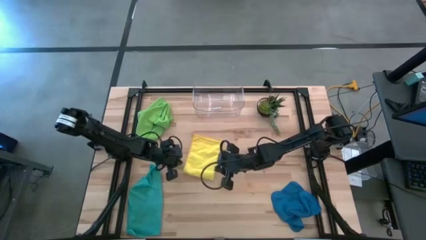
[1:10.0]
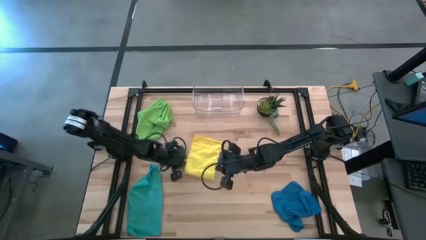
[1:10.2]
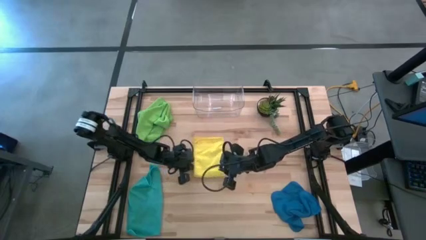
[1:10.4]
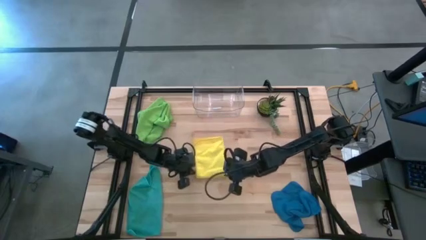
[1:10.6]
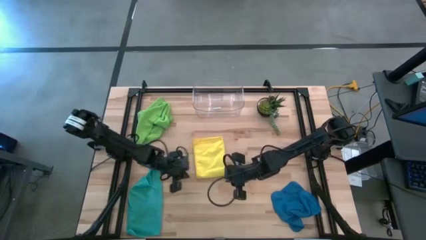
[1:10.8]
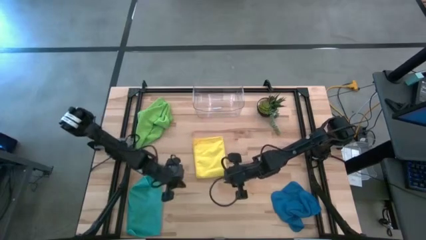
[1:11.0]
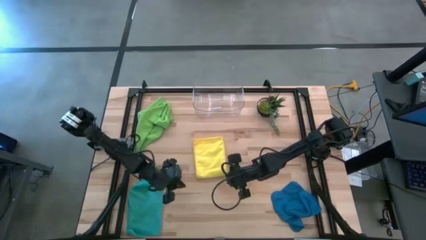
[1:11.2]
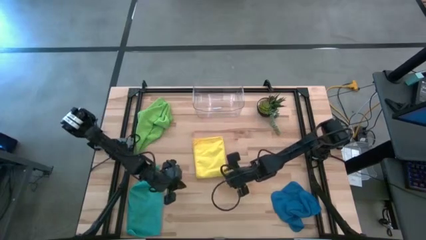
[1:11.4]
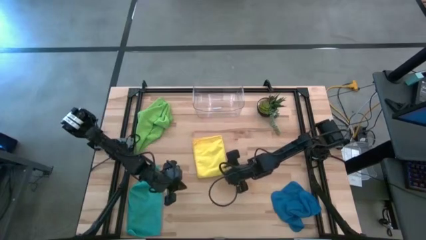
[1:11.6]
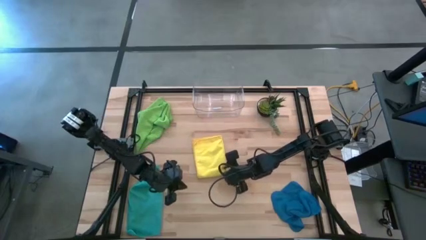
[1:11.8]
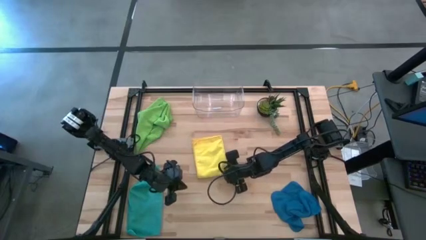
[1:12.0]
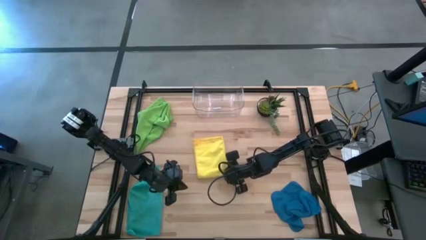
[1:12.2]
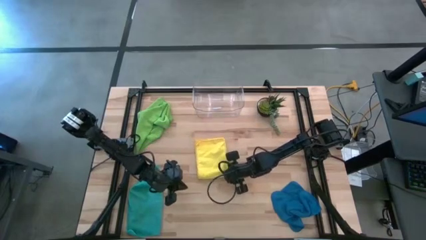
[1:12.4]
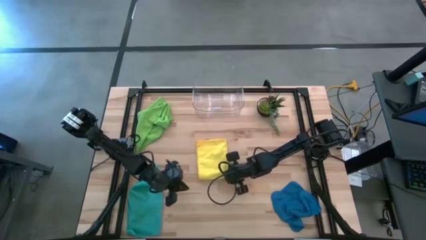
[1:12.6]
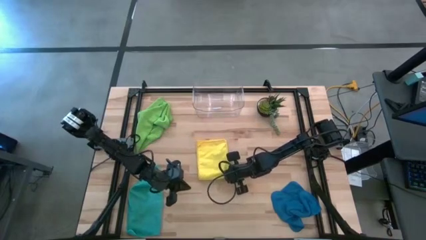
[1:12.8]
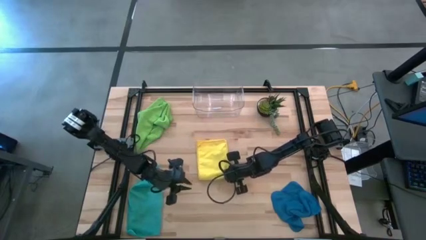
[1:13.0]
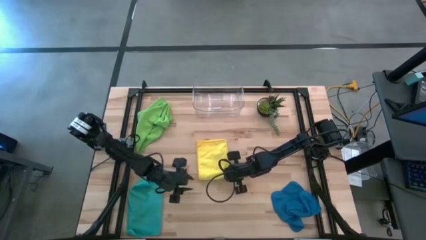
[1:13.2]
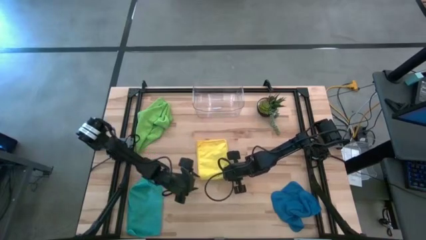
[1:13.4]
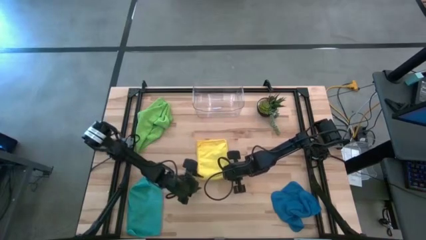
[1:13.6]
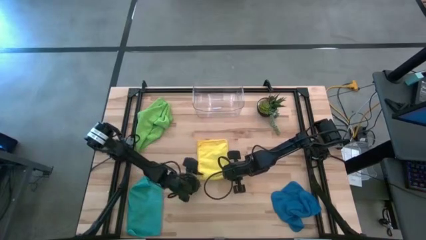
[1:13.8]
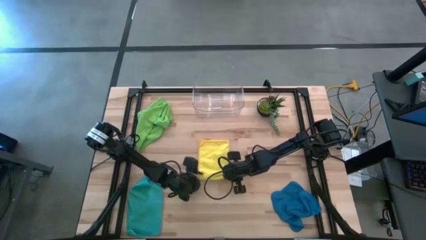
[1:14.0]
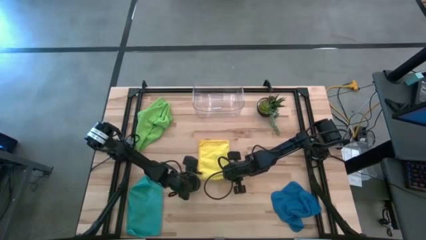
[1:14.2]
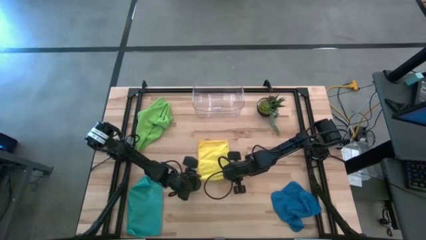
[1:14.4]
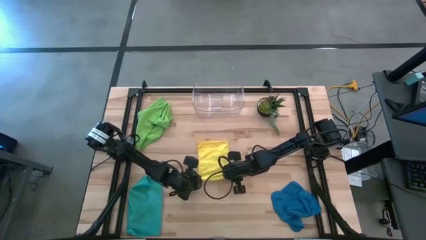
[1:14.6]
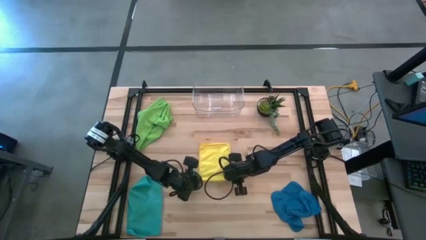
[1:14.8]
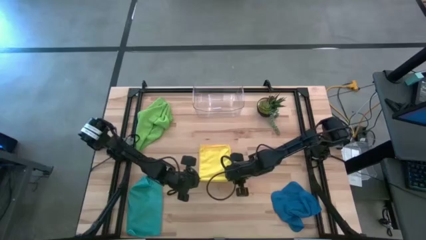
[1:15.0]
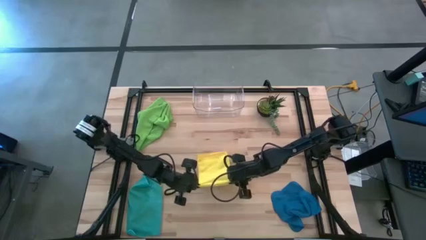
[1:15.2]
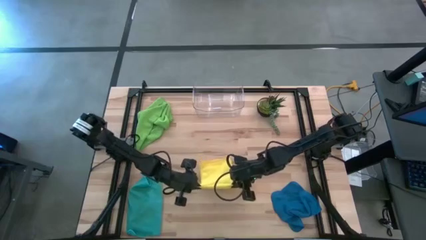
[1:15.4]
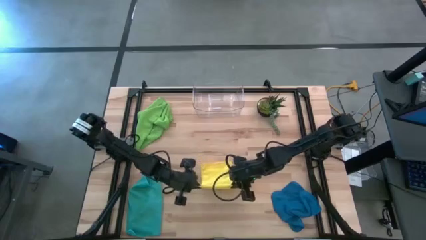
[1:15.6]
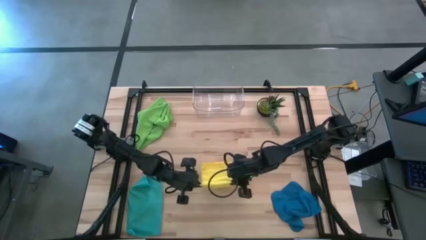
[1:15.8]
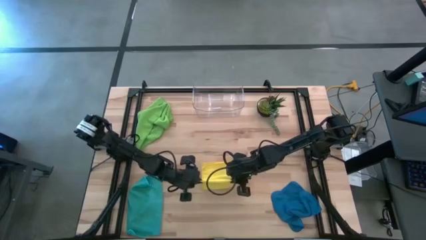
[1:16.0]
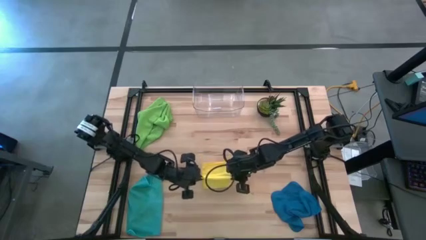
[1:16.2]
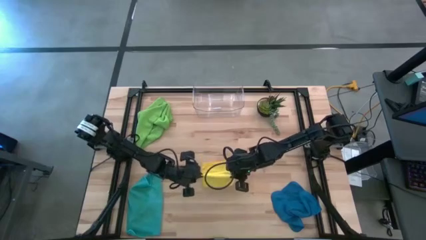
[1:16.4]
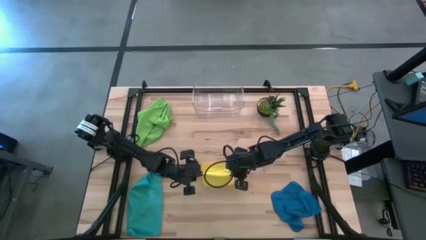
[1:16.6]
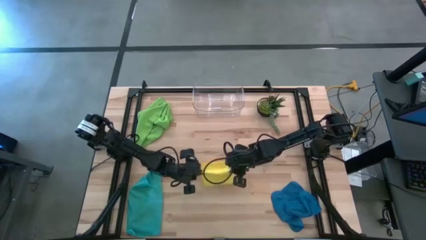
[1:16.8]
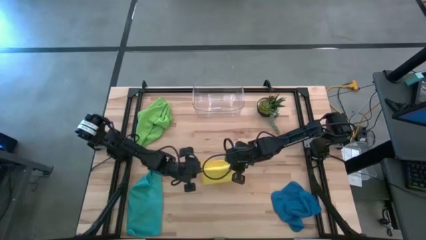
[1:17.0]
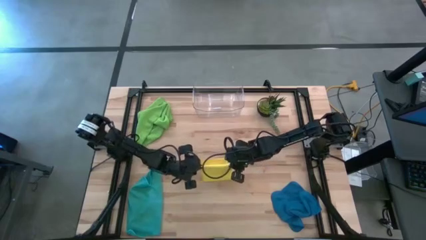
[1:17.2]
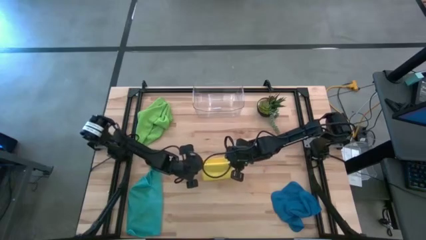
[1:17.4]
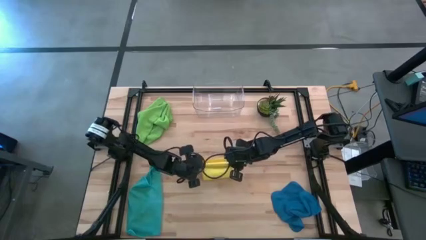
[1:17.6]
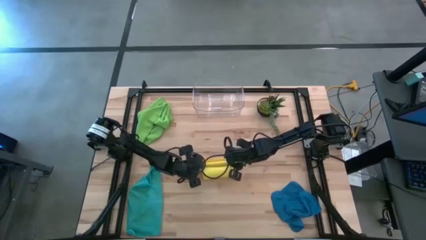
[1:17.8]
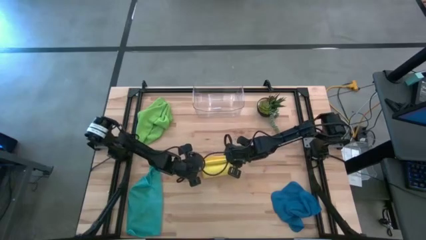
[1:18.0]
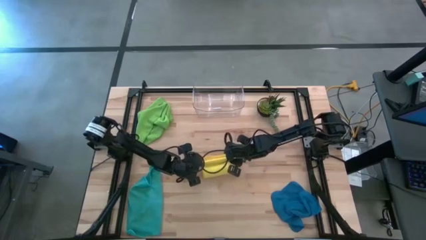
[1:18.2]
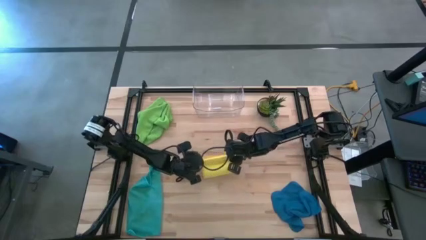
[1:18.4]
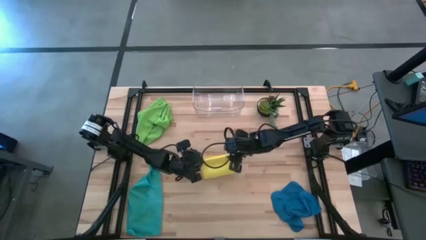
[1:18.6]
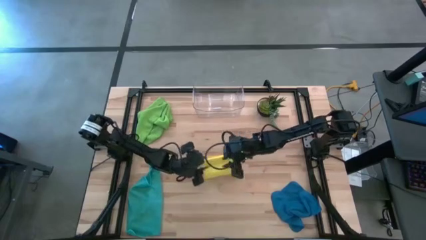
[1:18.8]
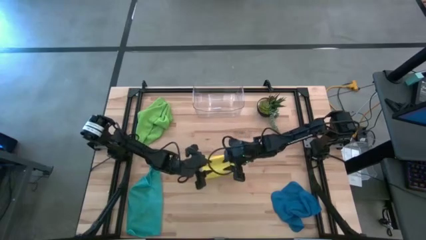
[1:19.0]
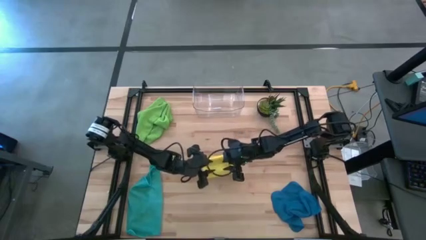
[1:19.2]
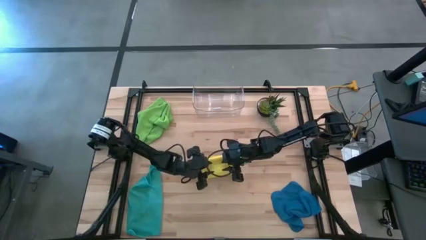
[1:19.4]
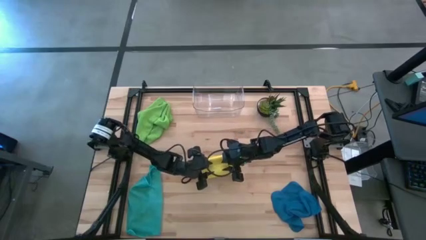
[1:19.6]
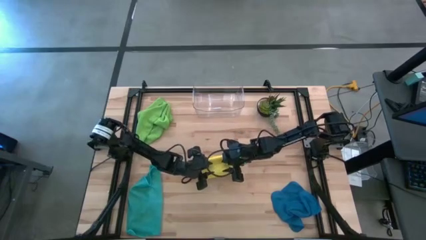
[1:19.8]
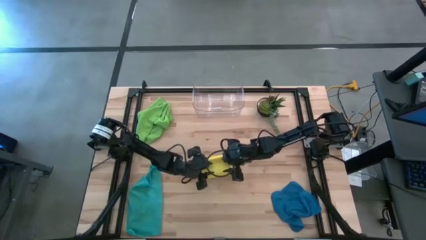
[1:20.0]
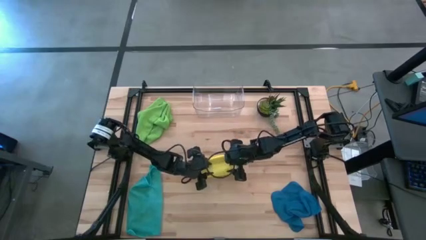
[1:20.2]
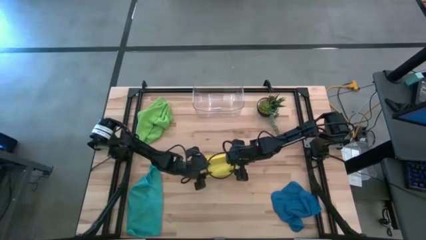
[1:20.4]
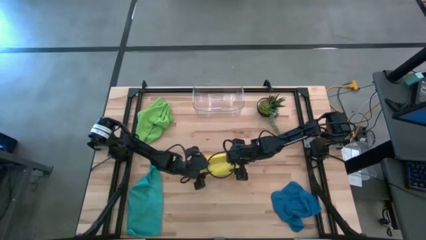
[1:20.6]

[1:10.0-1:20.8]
Task: Fold microfiber towels
Fold the yellow microfiber towel
